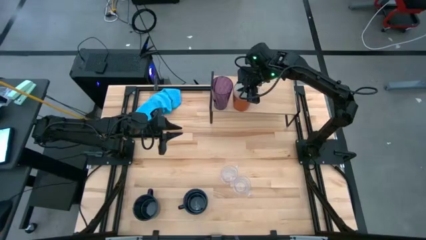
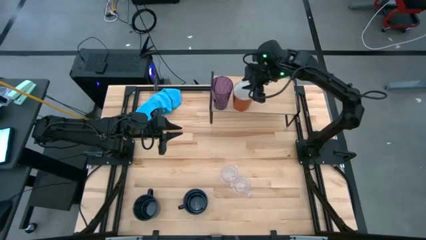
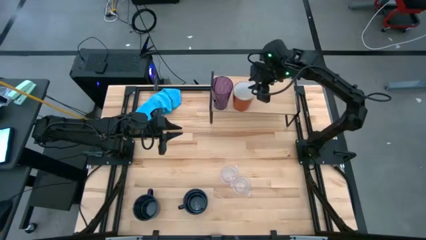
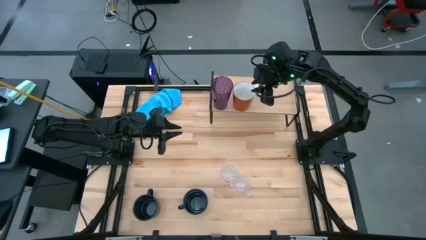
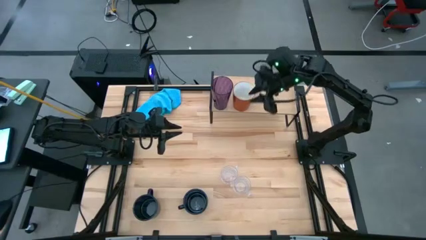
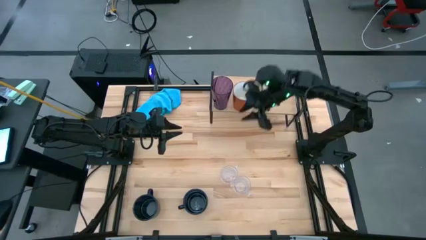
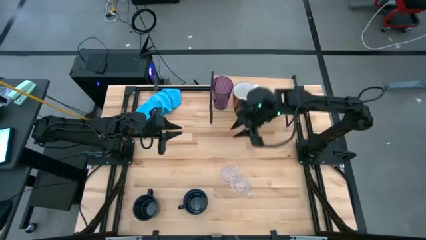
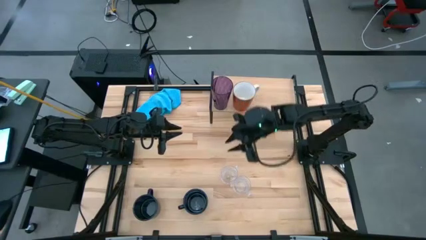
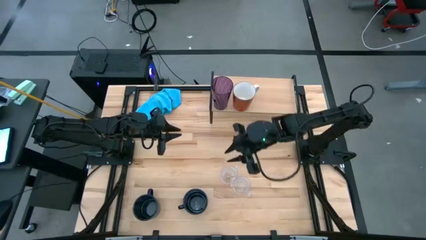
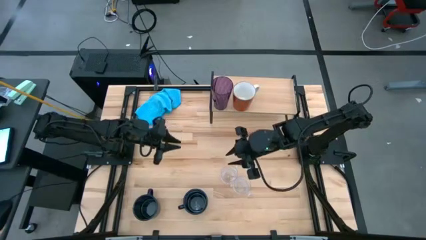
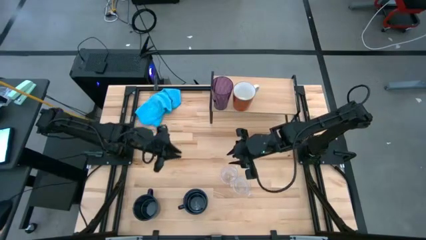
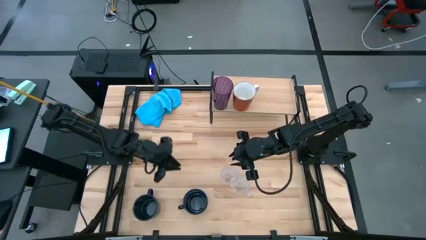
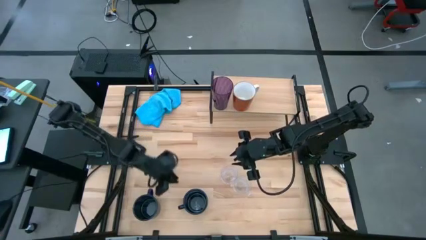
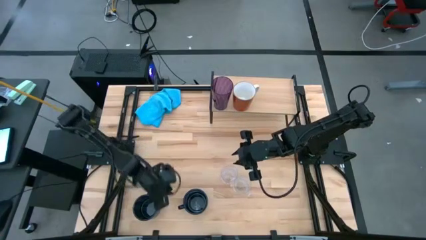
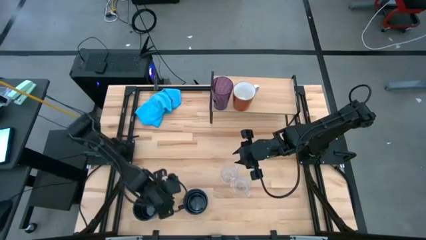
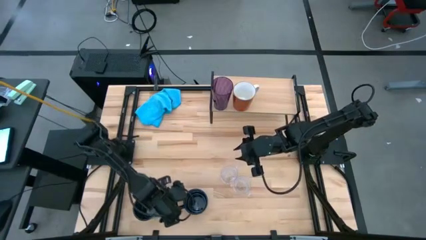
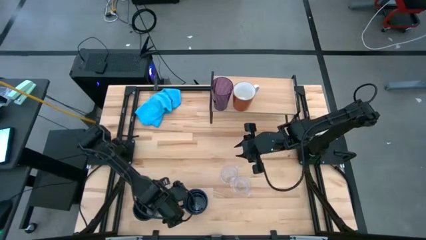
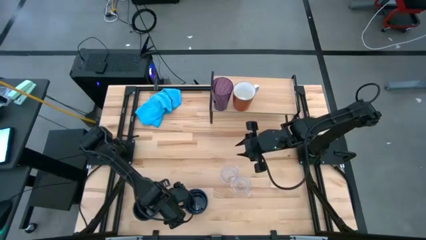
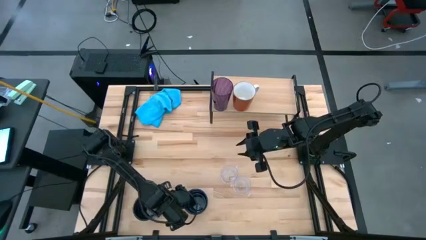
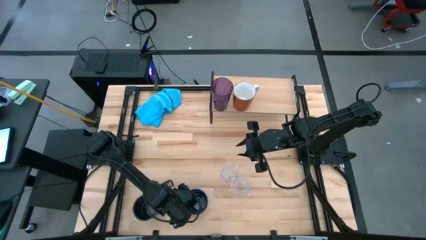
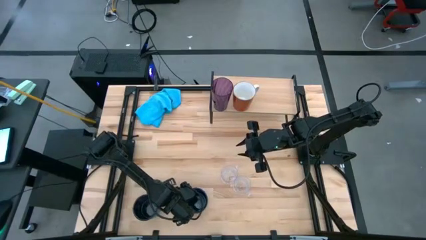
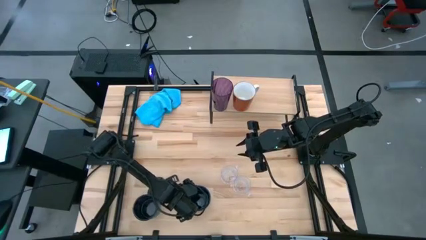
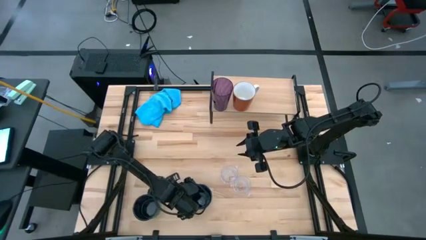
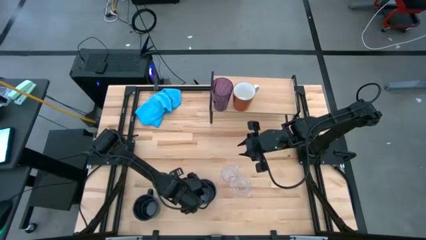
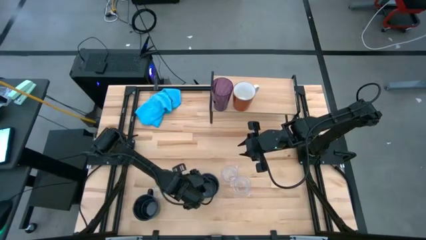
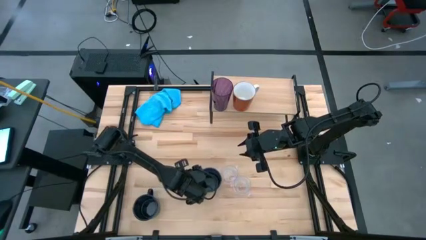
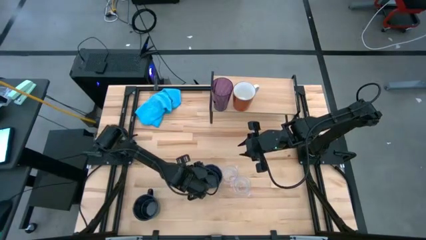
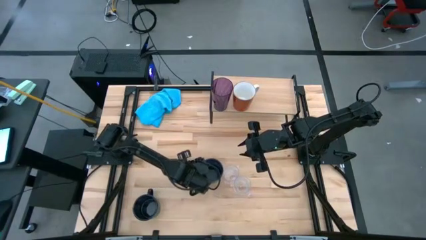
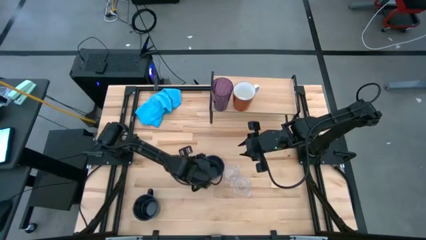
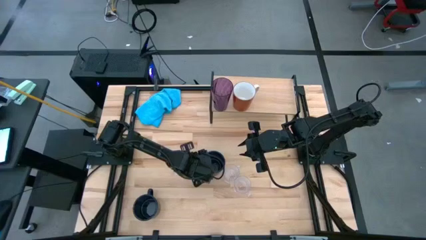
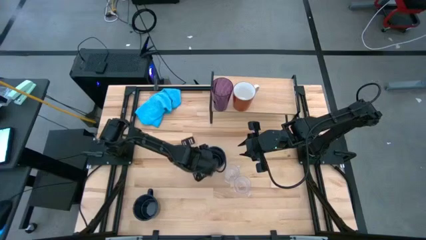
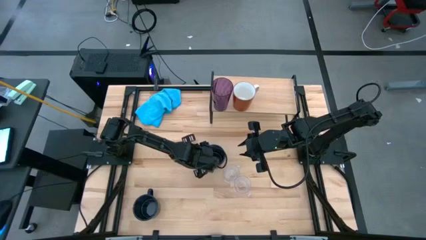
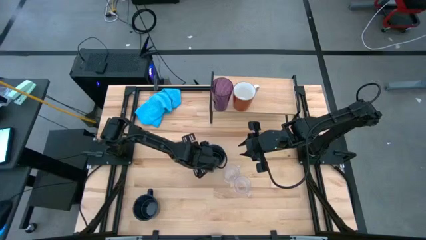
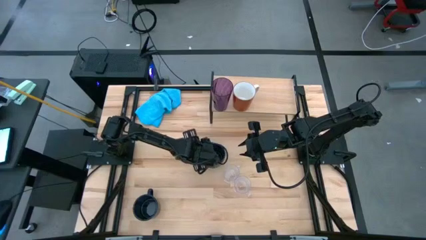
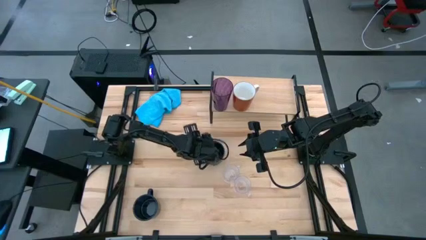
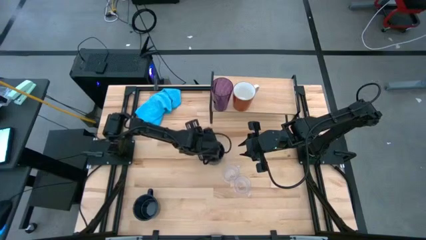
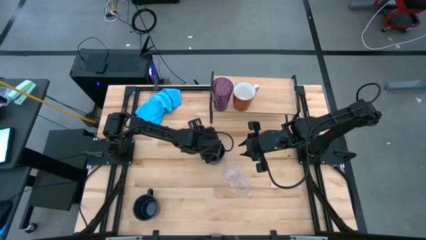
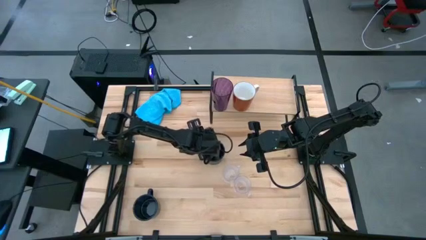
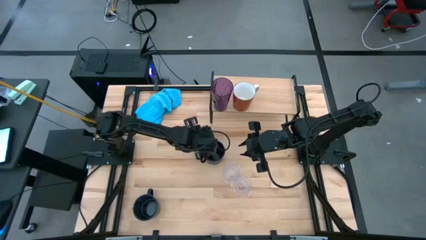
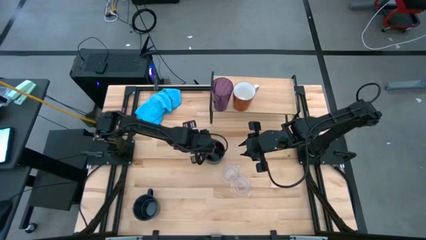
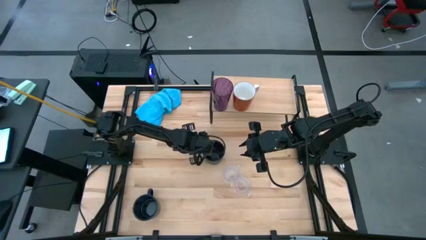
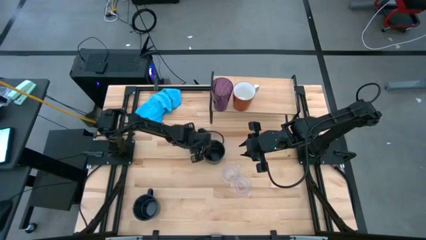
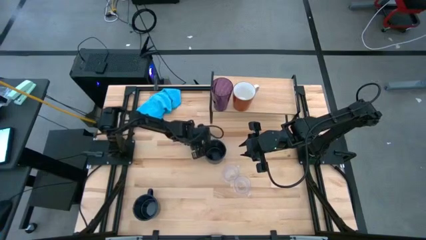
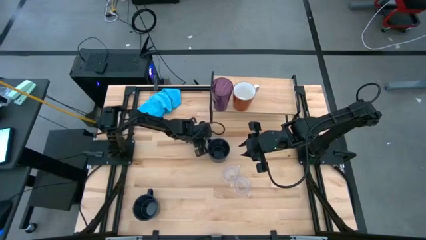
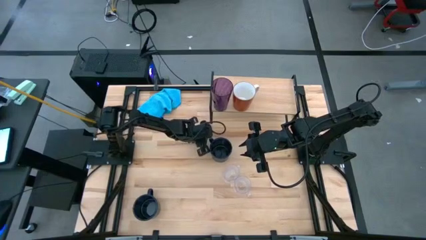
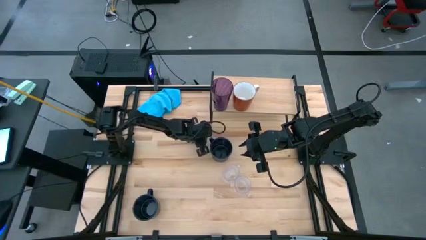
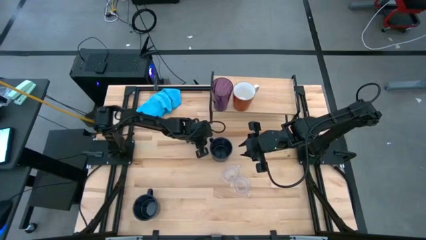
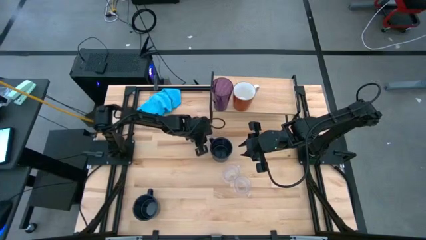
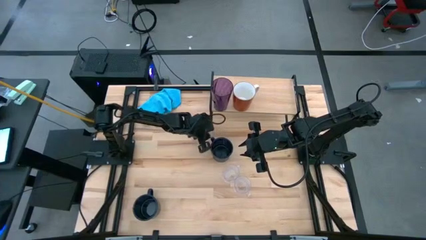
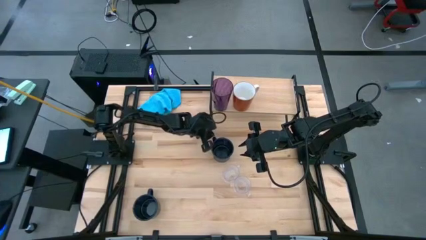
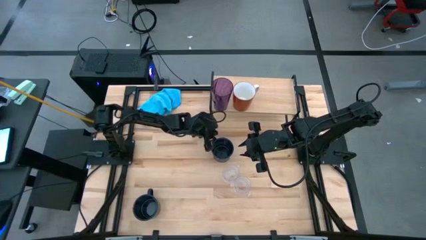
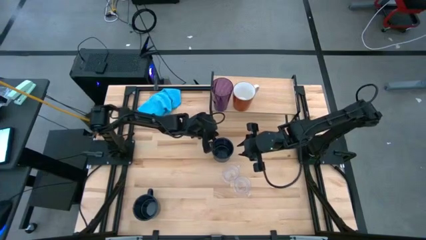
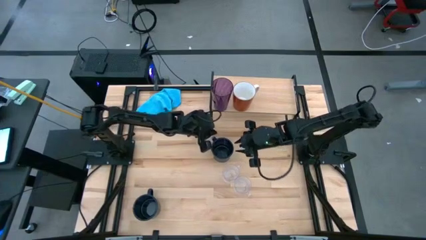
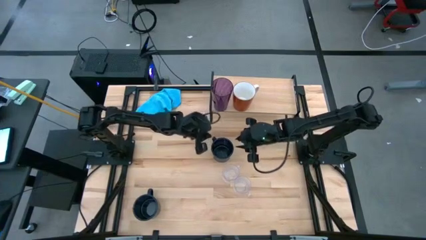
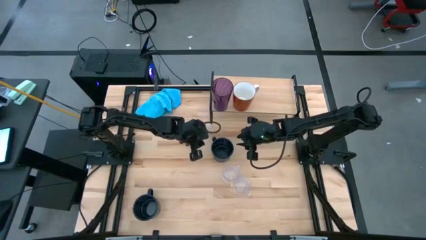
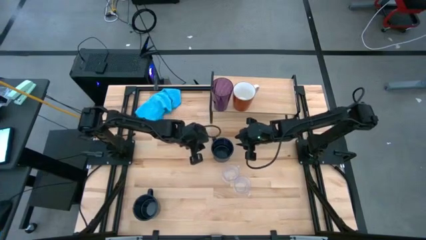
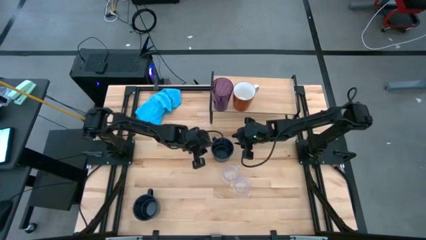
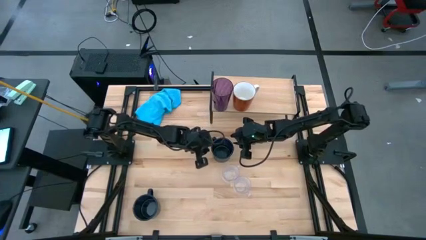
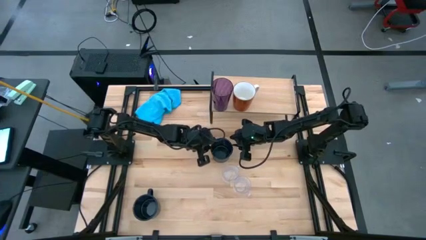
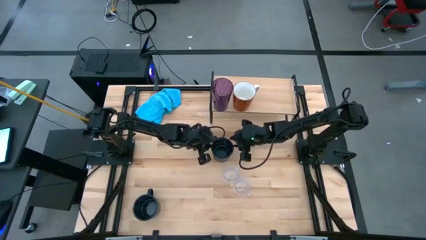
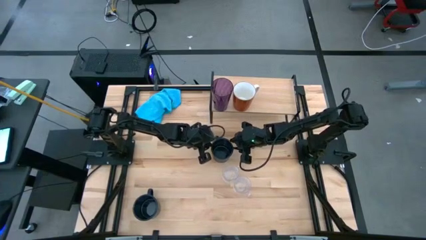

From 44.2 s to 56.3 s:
Task: Stack small to large cups/mugs on shelf
Put the right black mug on the shelf
